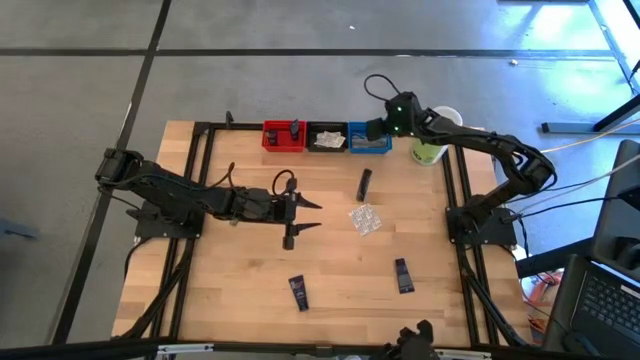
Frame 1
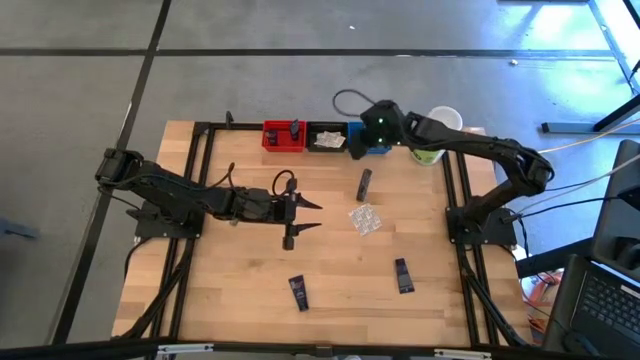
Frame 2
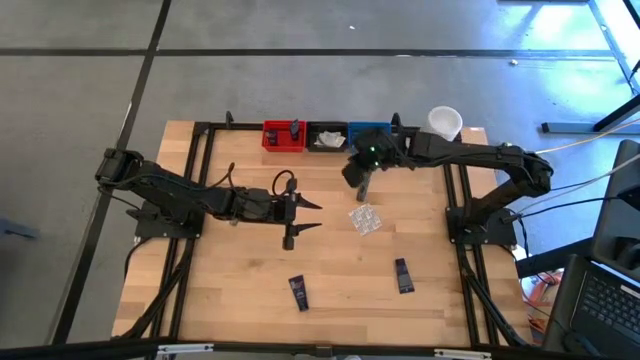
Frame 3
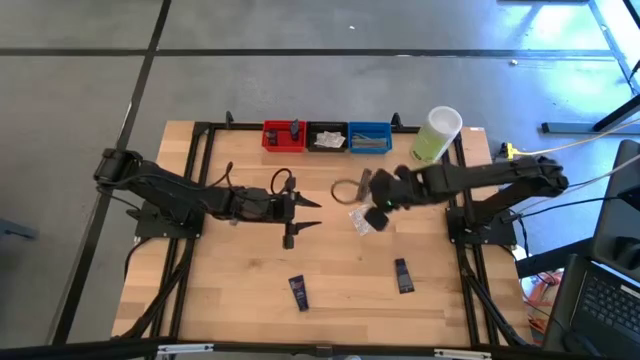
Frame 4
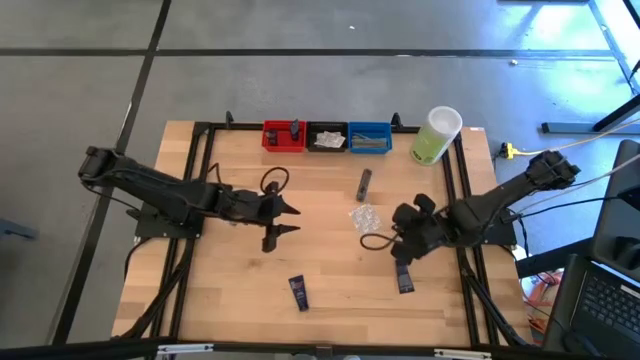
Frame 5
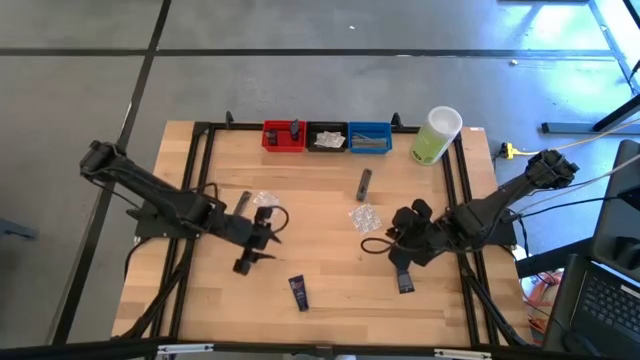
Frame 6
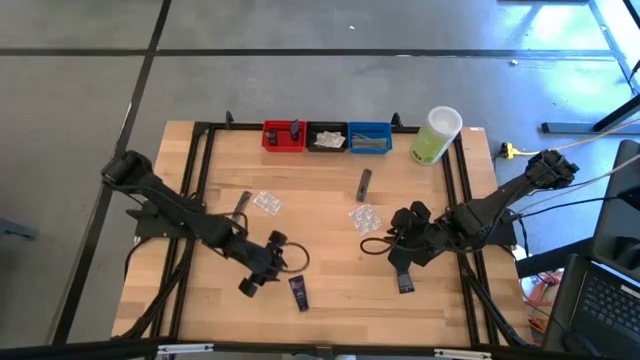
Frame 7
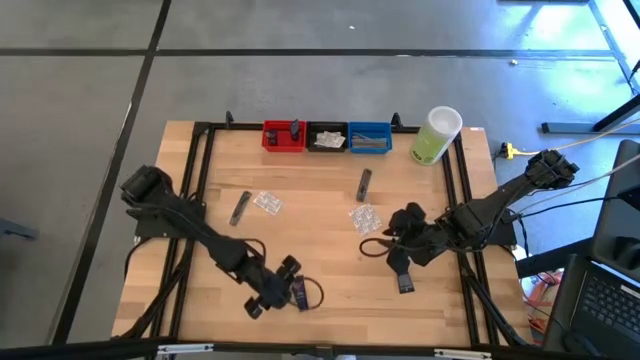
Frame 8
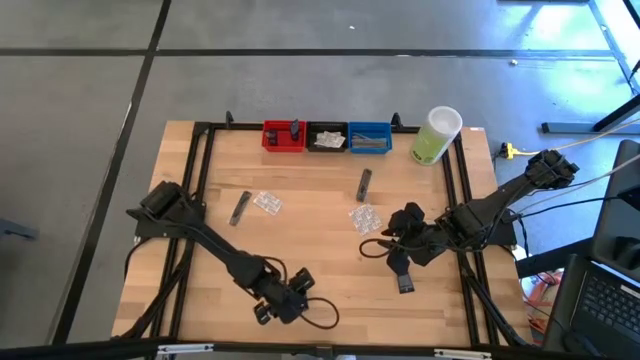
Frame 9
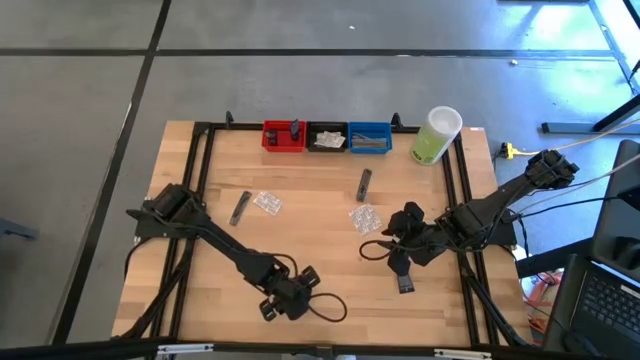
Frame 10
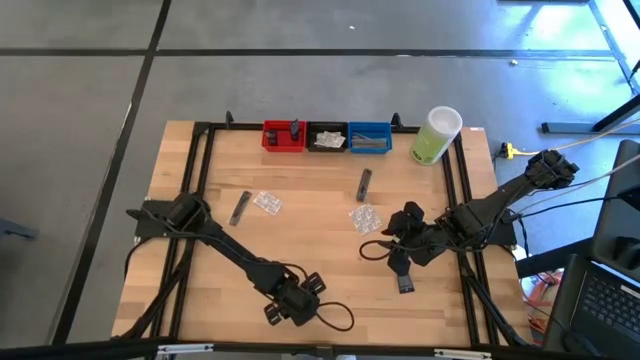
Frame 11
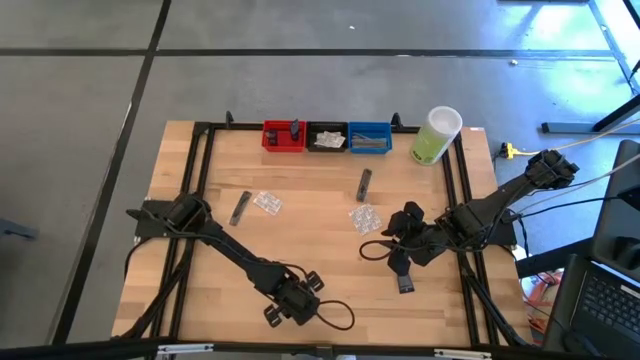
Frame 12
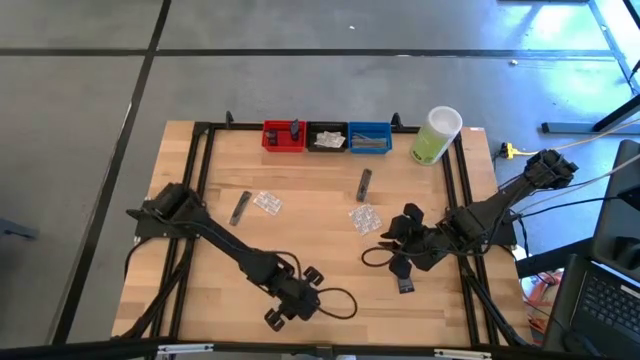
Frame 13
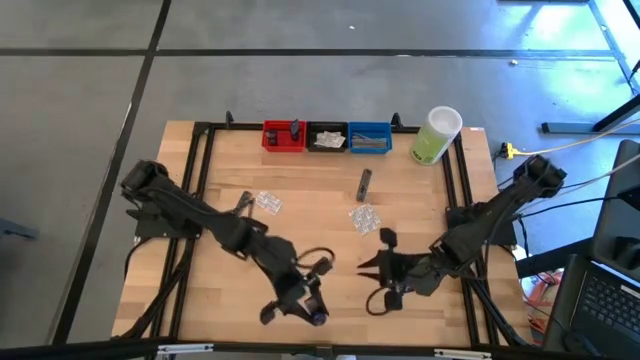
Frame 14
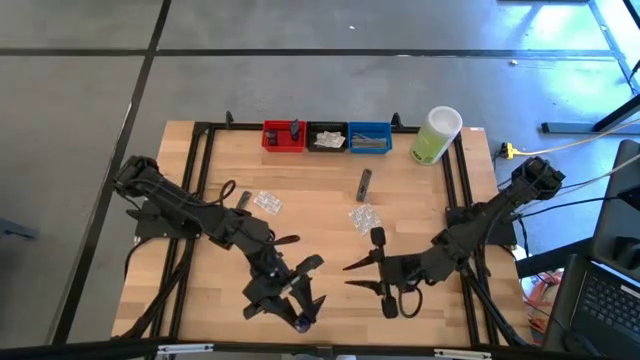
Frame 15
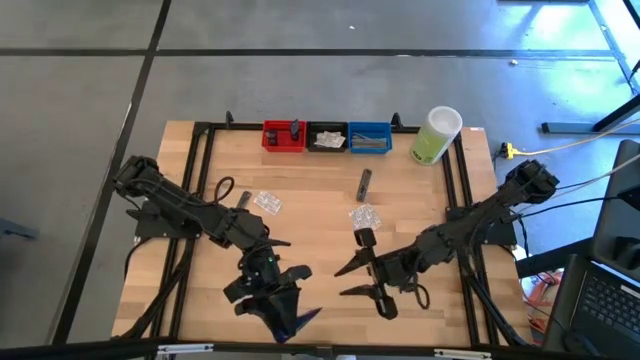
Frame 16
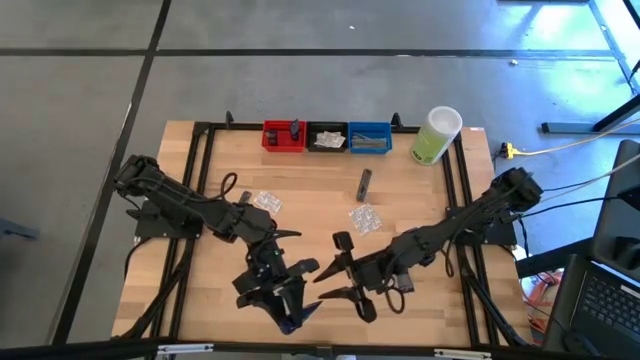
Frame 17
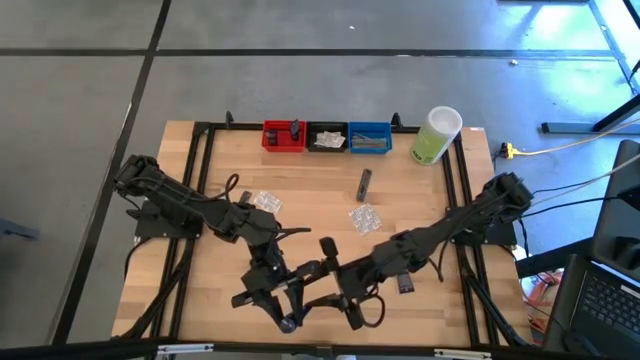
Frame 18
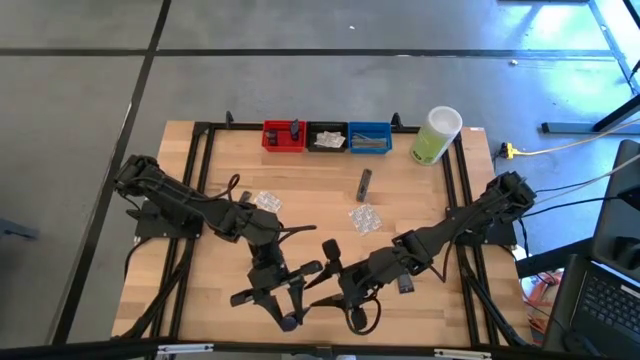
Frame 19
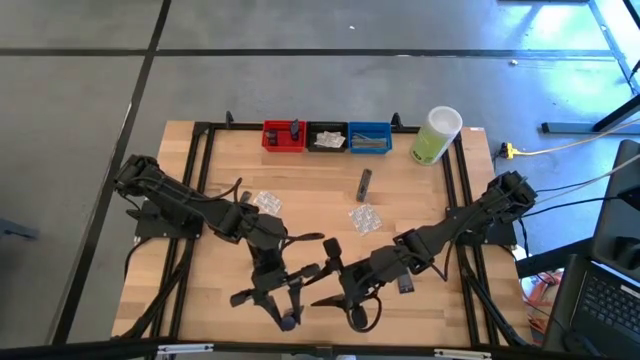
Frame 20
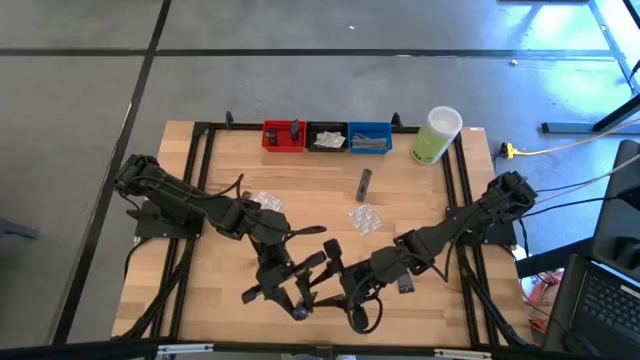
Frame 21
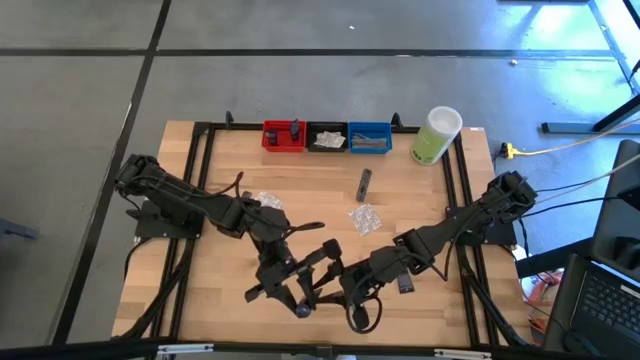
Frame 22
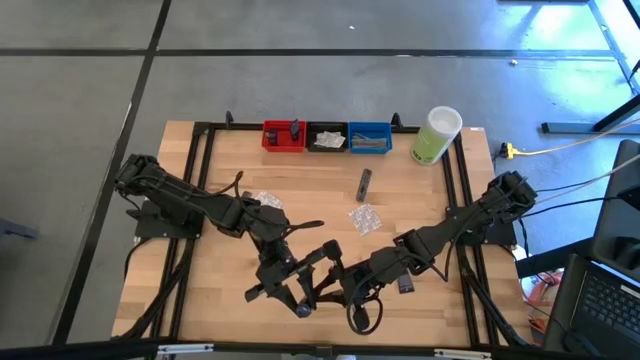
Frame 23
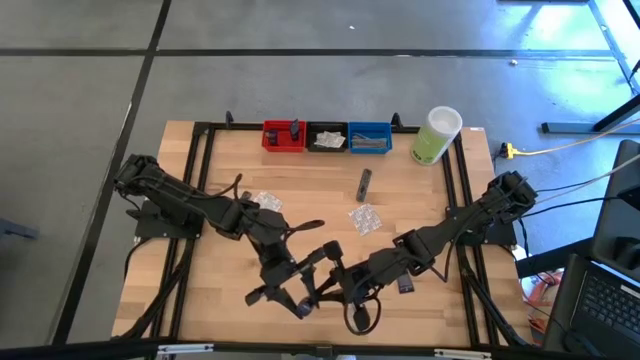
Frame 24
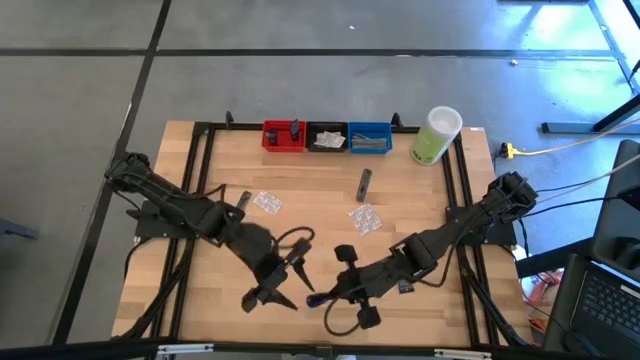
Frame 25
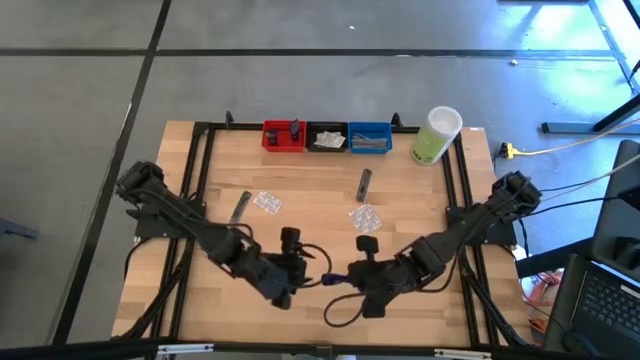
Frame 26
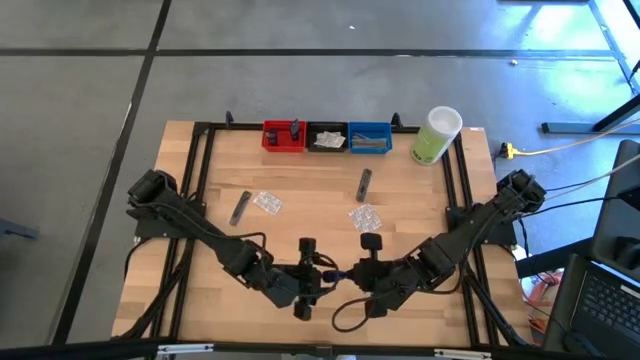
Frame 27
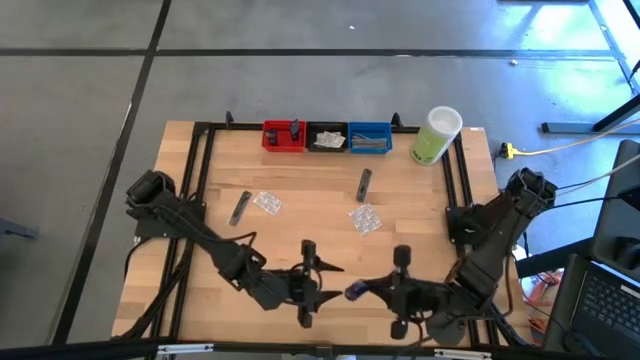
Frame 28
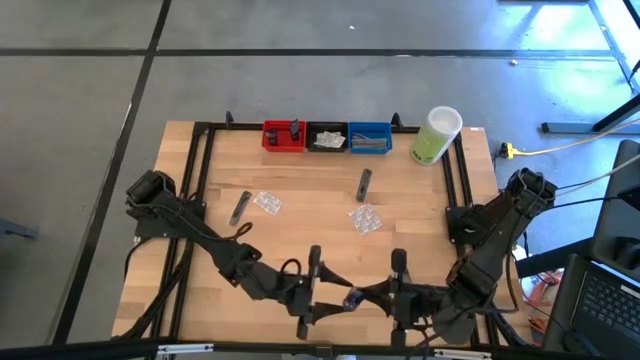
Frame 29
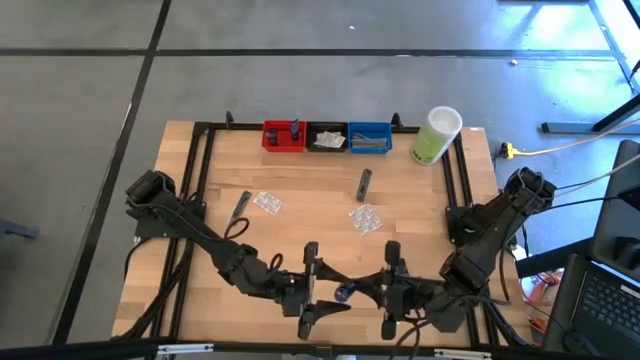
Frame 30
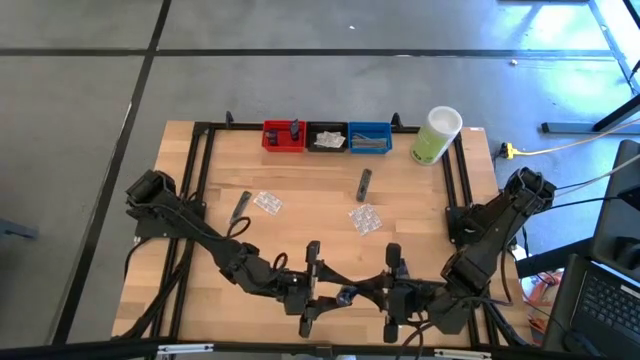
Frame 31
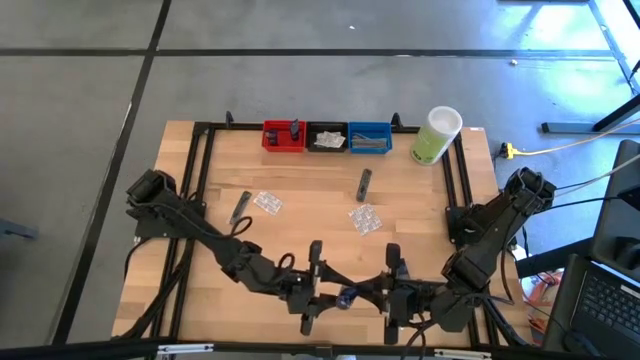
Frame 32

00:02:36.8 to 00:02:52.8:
Task: Pick & Place Travel size toiletries
Put the blue shave cream into the red bin

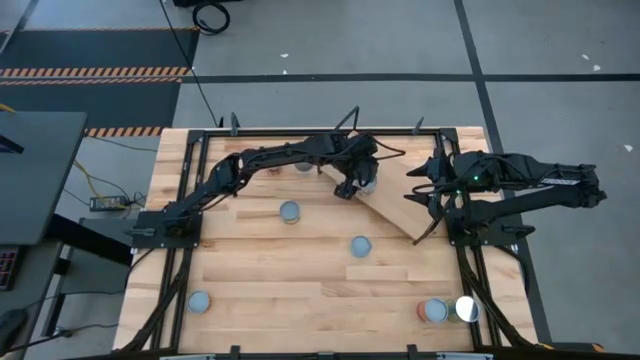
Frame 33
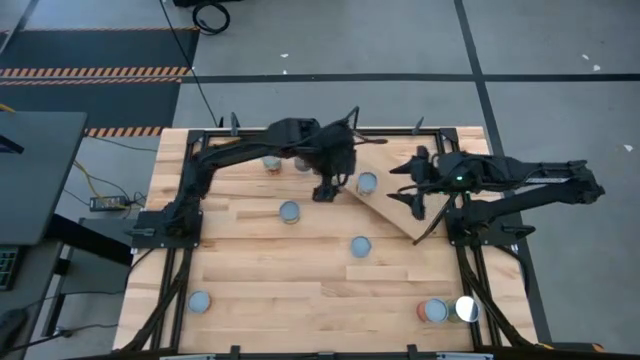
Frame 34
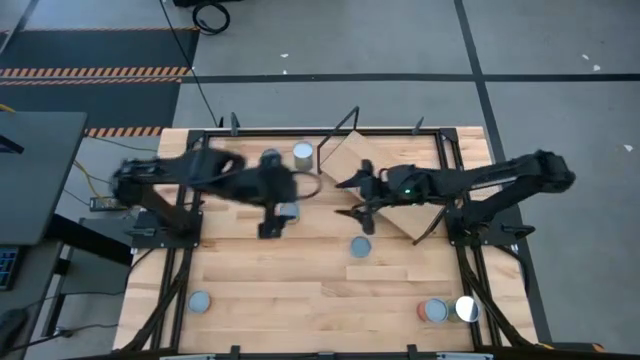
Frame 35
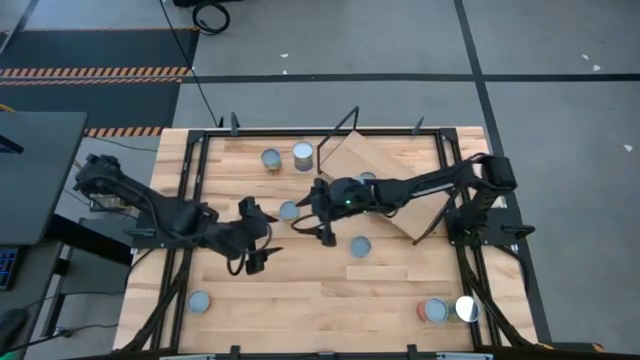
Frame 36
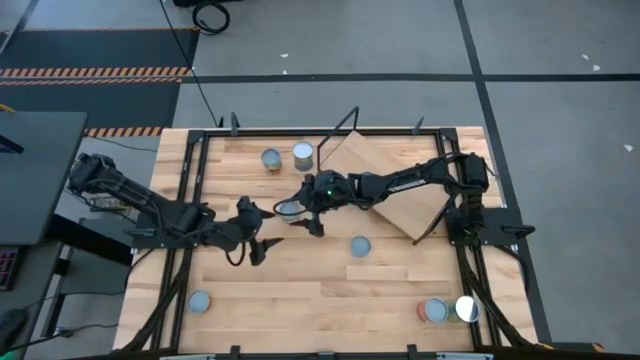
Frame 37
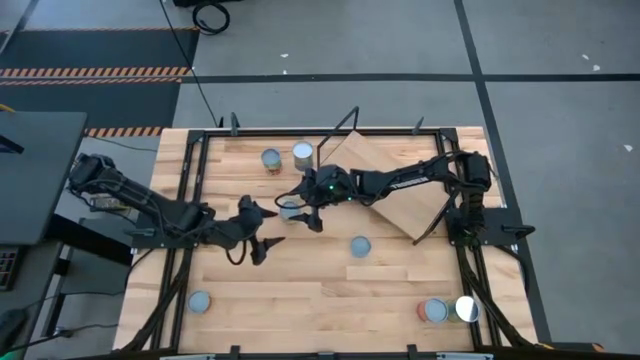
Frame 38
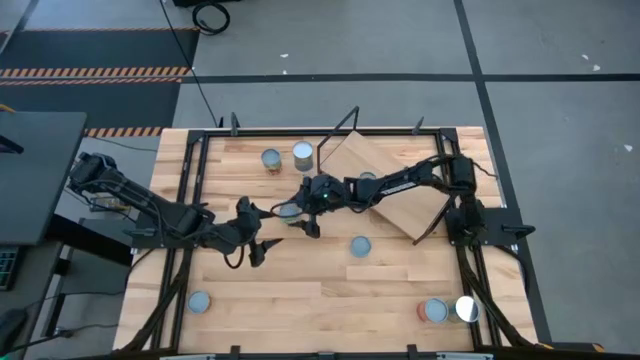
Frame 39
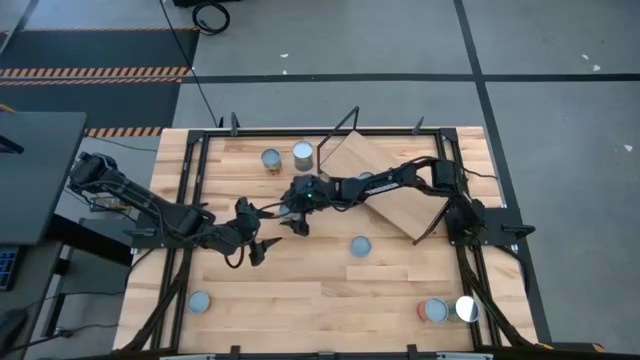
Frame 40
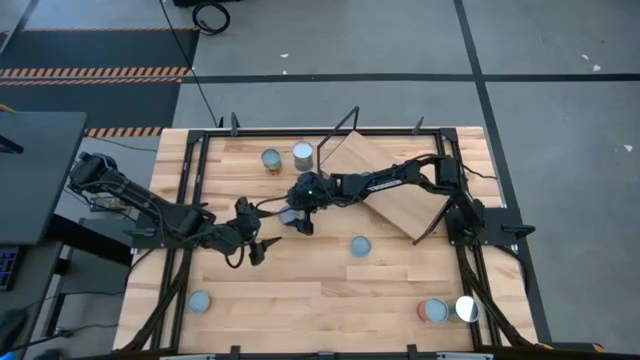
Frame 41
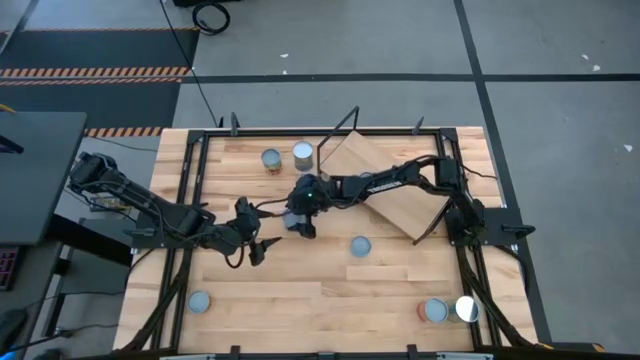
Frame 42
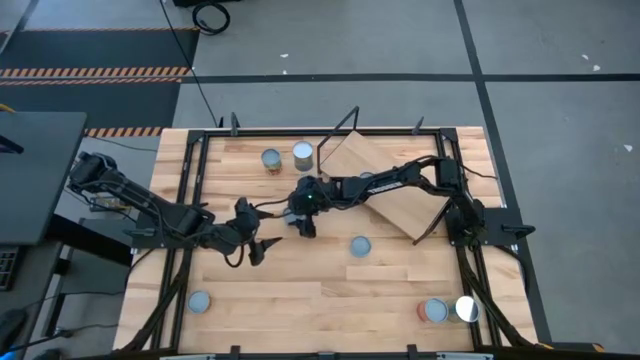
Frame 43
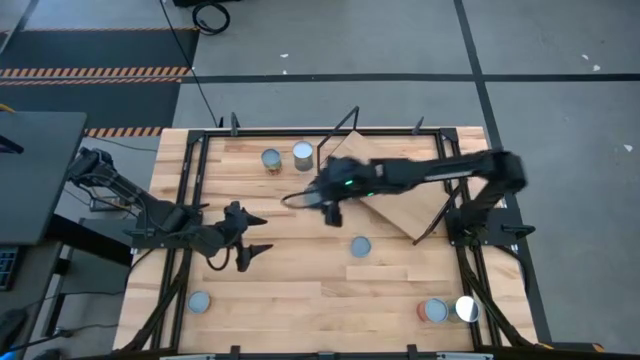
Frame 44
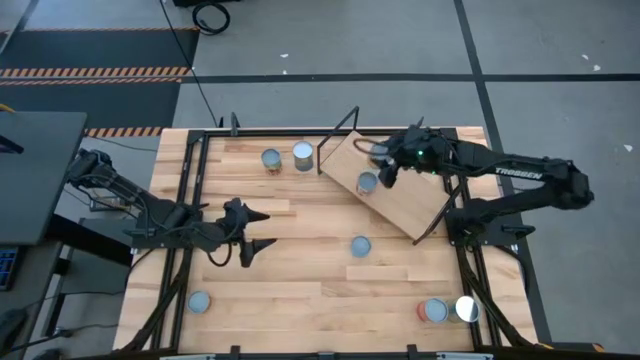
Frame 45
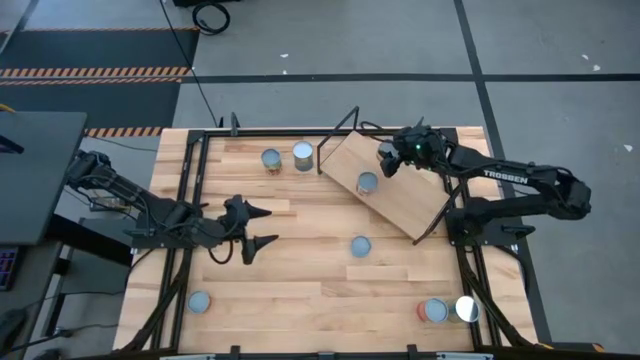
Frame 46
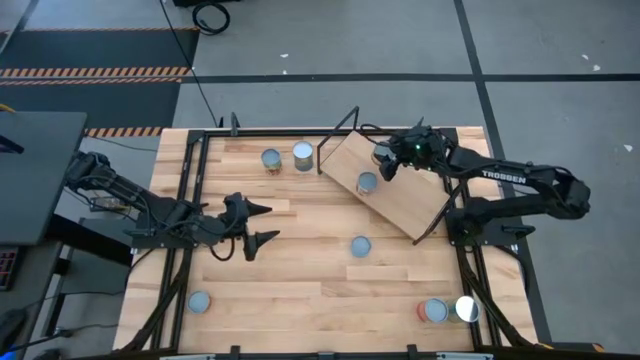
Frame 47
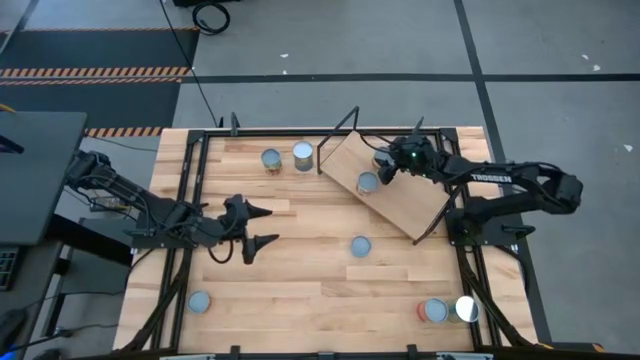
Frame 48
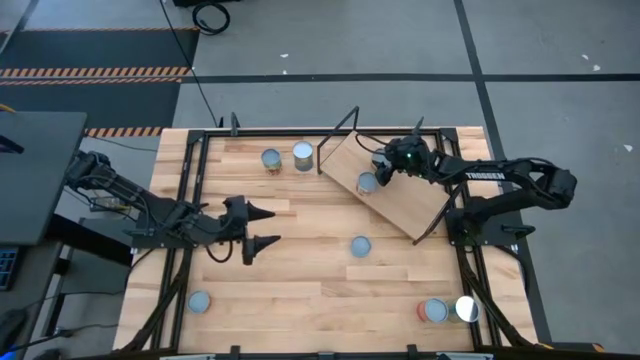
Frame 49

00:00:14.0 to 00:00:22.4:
Task: Pick and place cans onto a shelf
Put the canned peaches on the shelf aligned with the canned diced tomatoes
